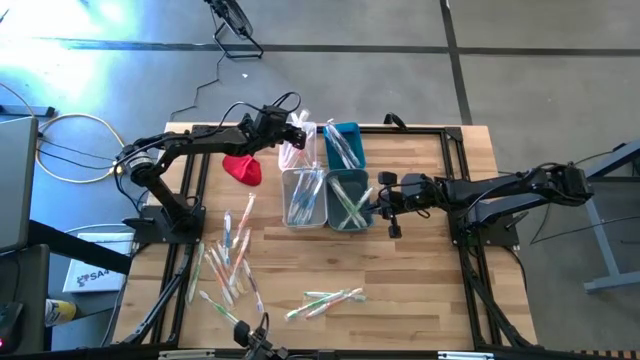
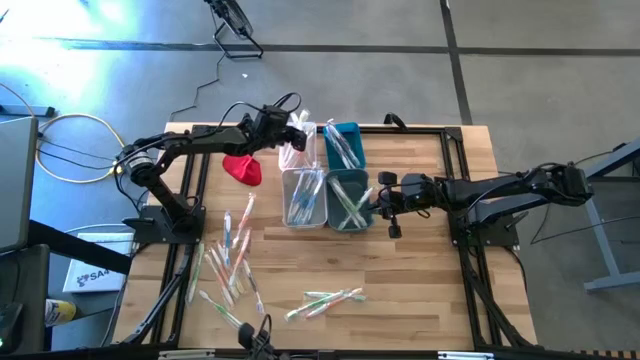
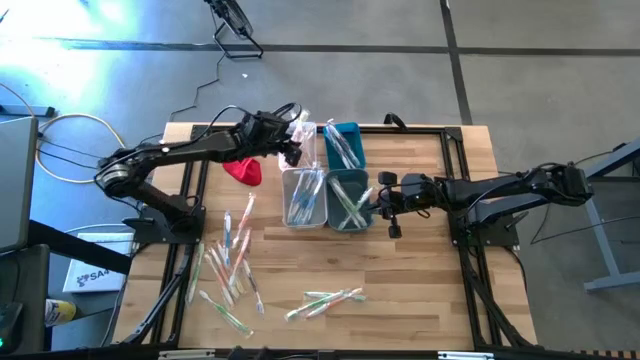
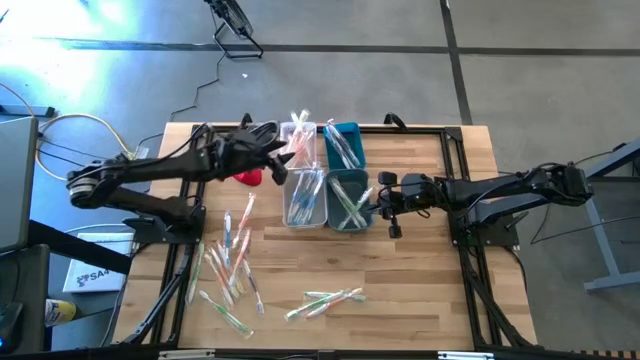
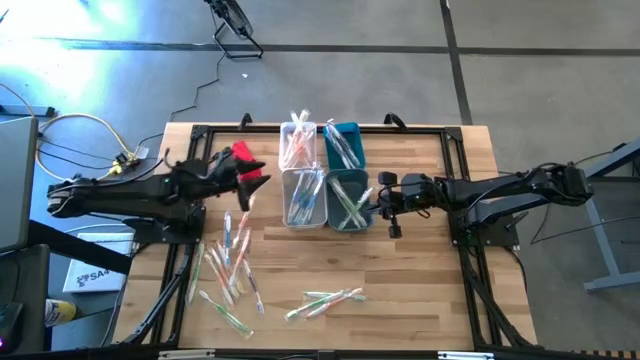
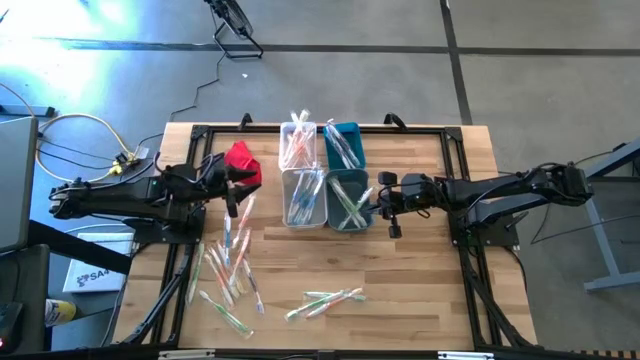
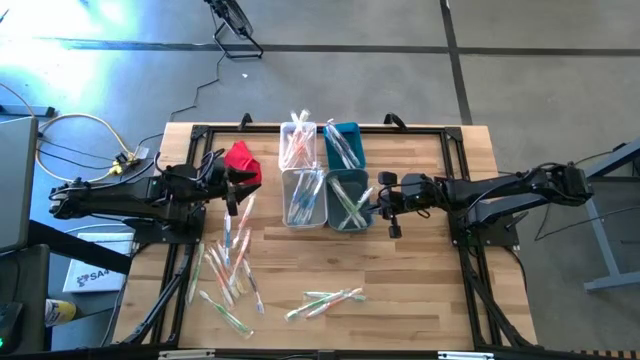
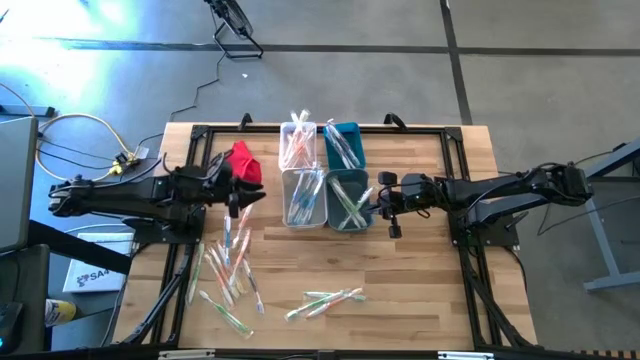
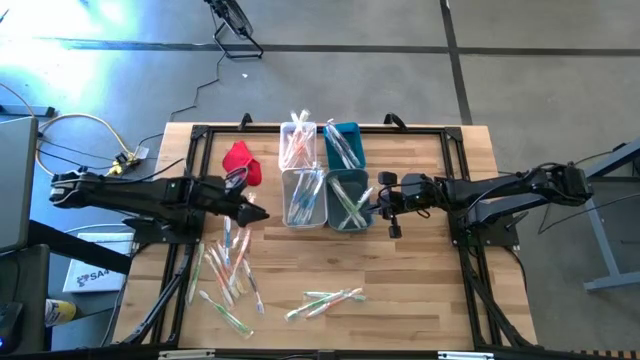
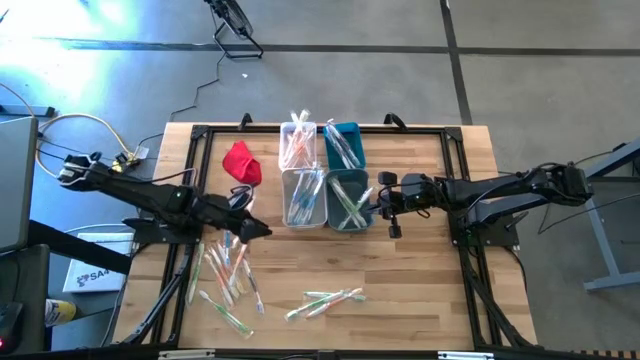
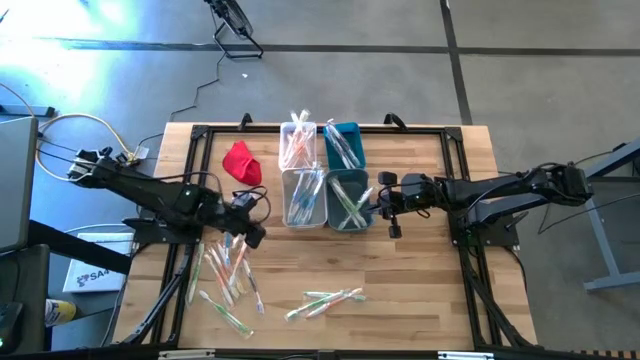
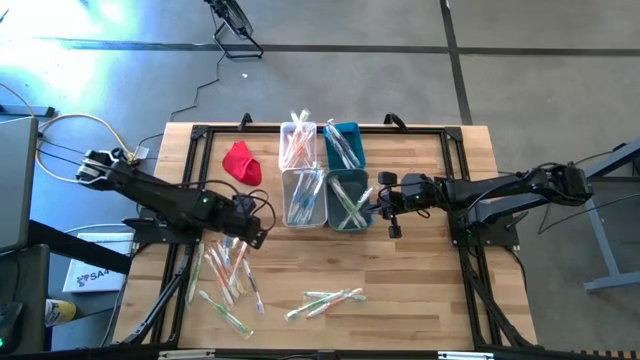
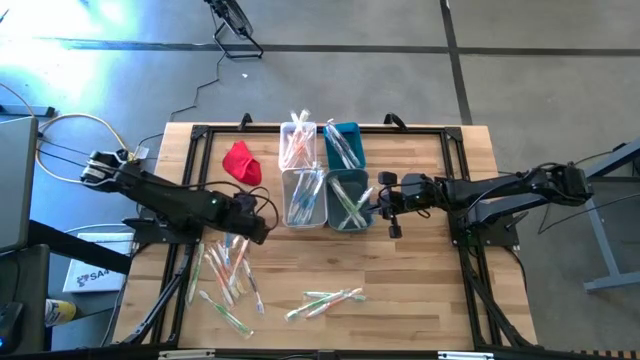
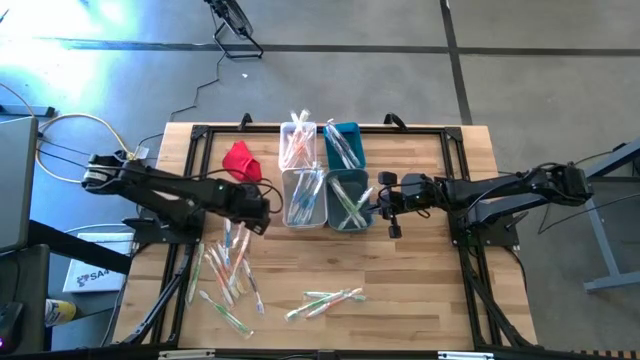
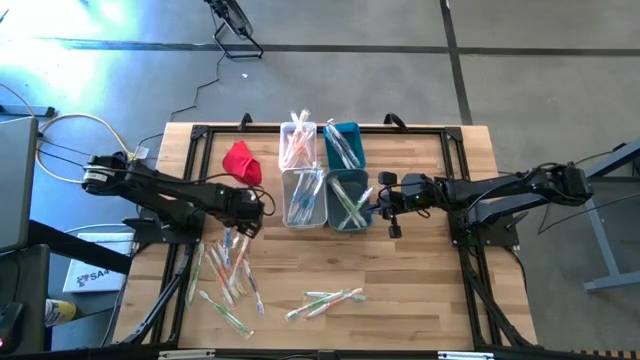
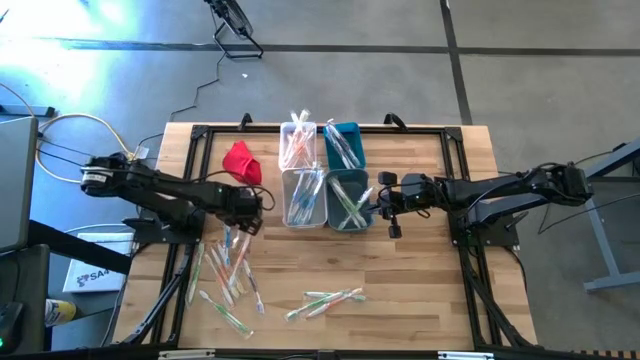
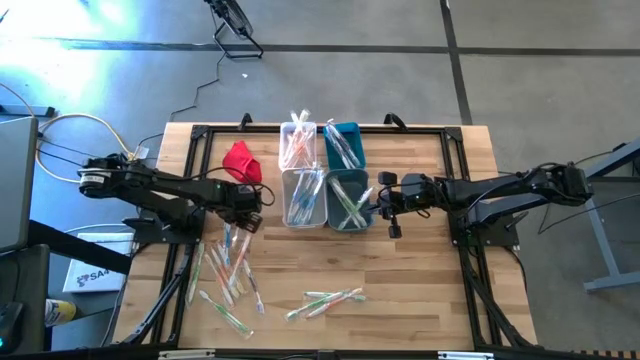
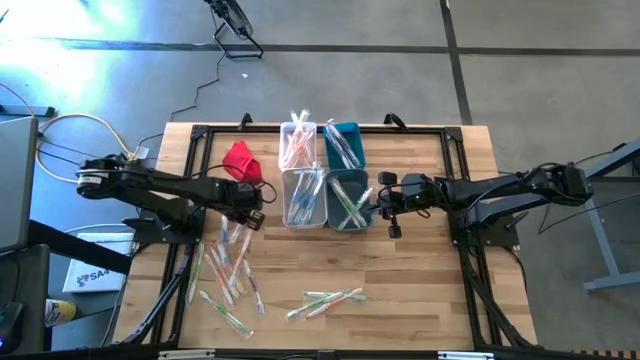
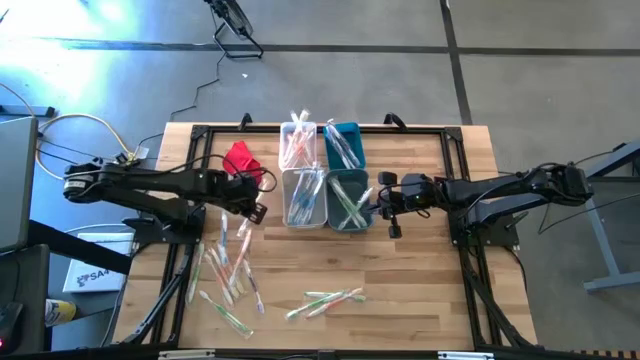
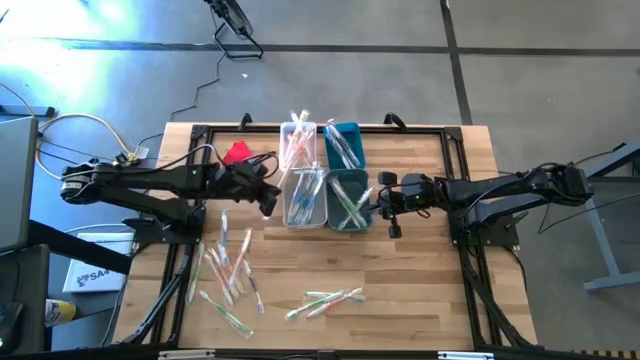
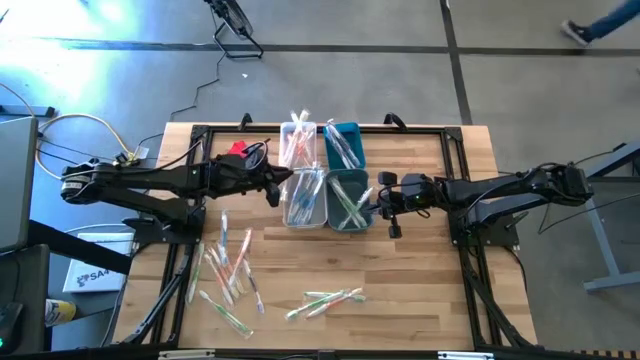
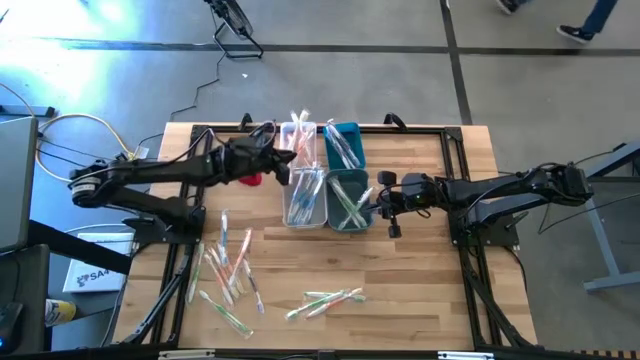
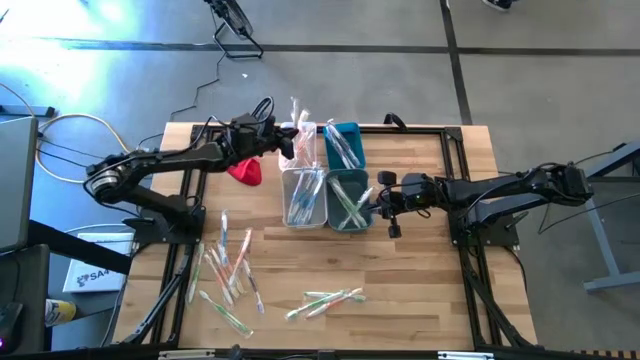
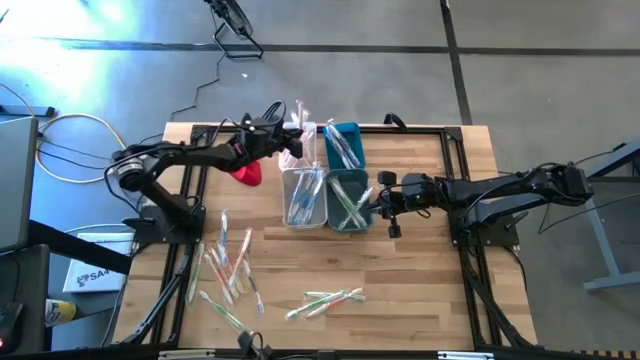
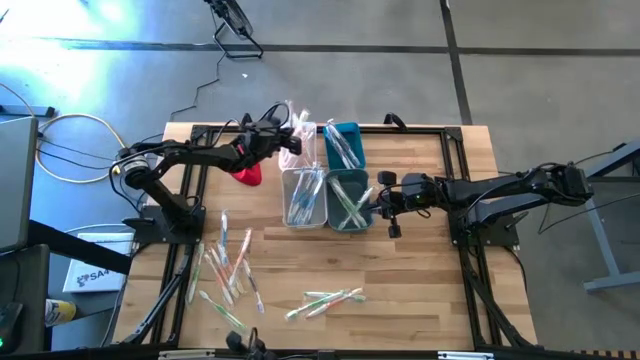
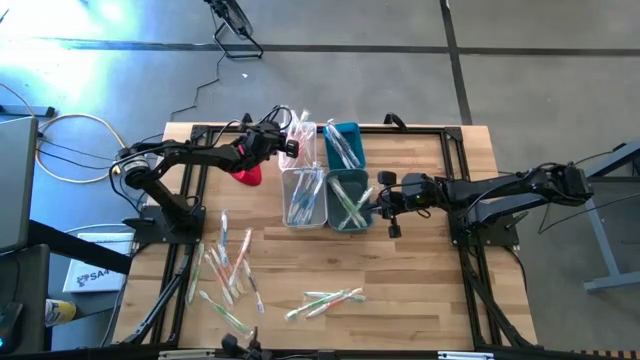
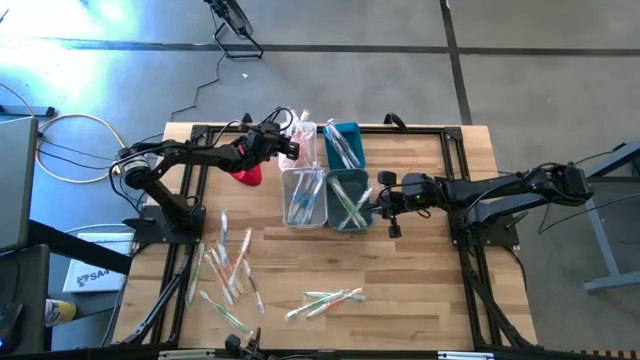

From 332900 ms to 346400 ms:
Task: Pick & Place Toothbrushes
Put the orange toothbrush into the transparent bin
